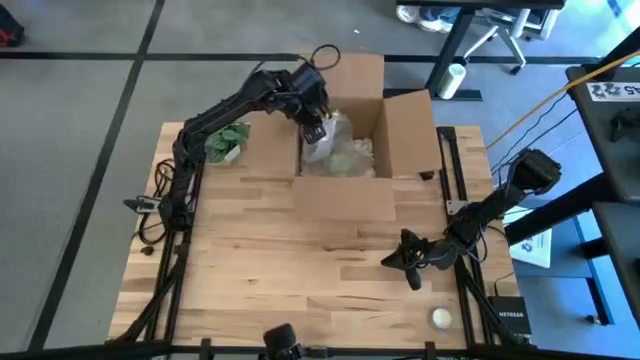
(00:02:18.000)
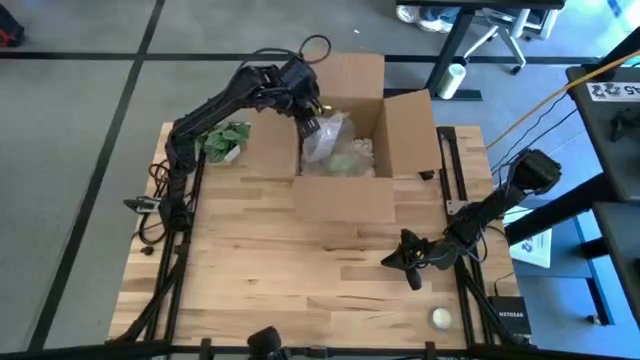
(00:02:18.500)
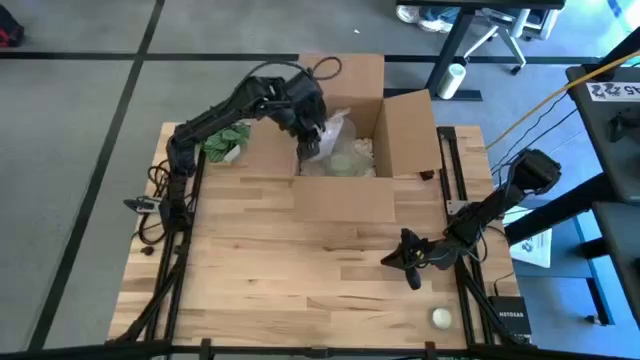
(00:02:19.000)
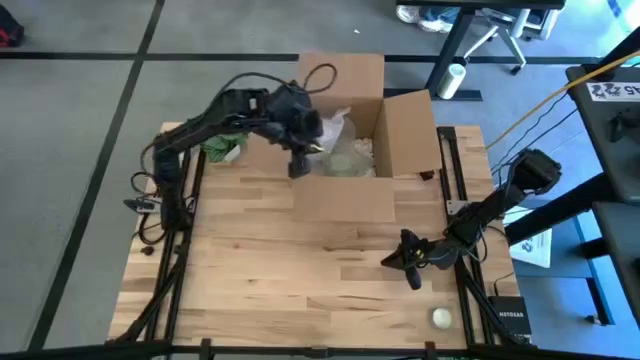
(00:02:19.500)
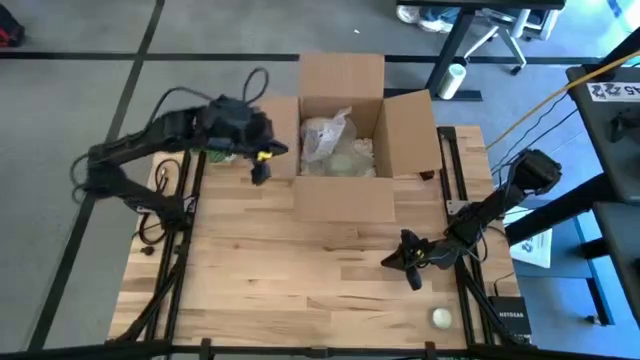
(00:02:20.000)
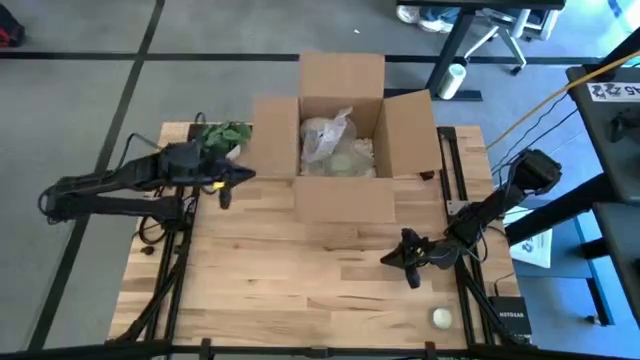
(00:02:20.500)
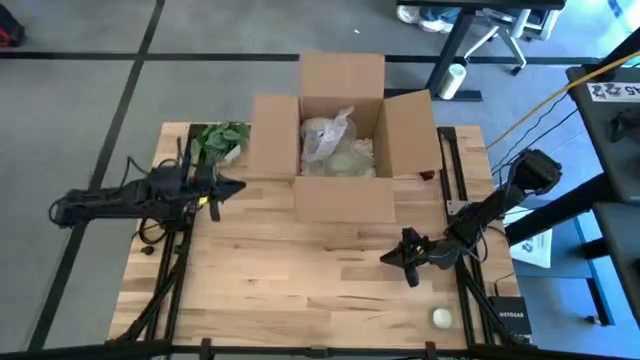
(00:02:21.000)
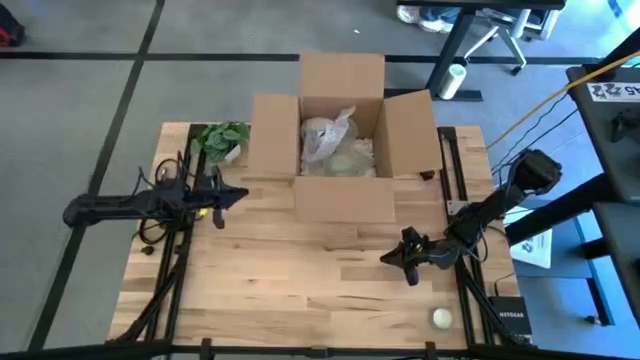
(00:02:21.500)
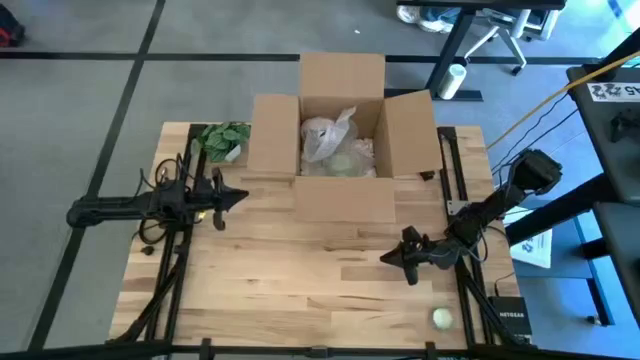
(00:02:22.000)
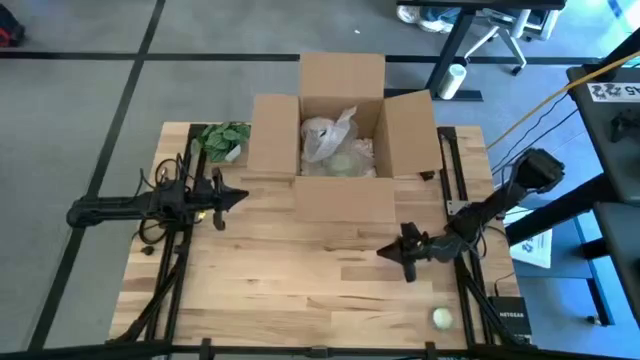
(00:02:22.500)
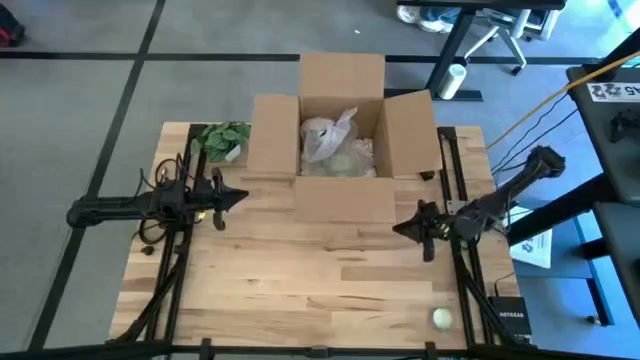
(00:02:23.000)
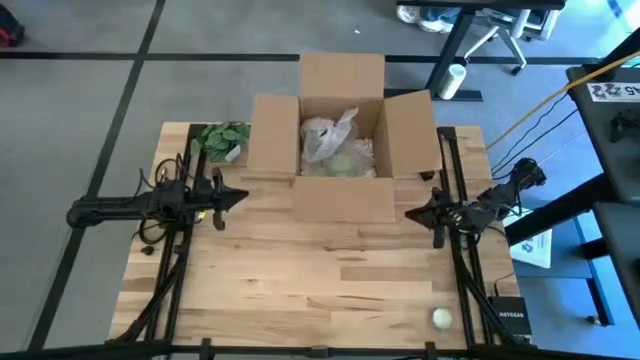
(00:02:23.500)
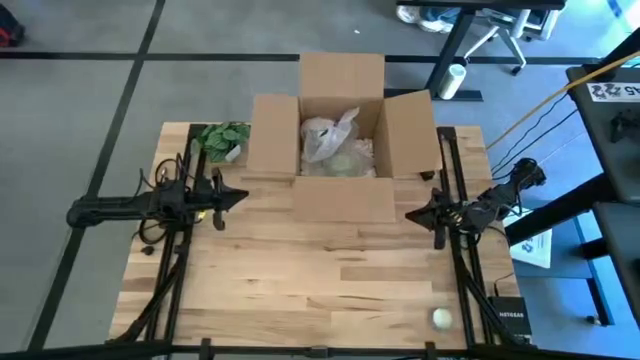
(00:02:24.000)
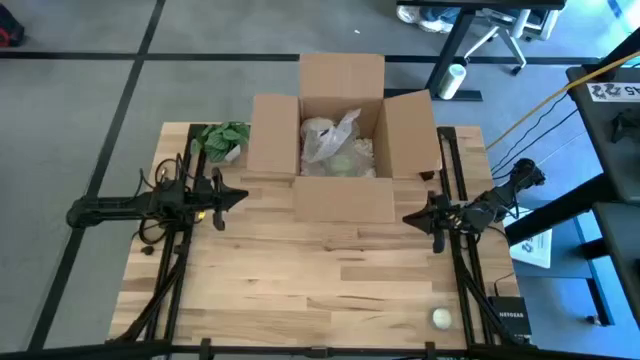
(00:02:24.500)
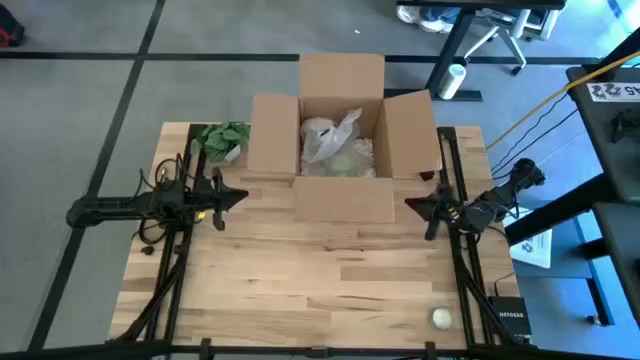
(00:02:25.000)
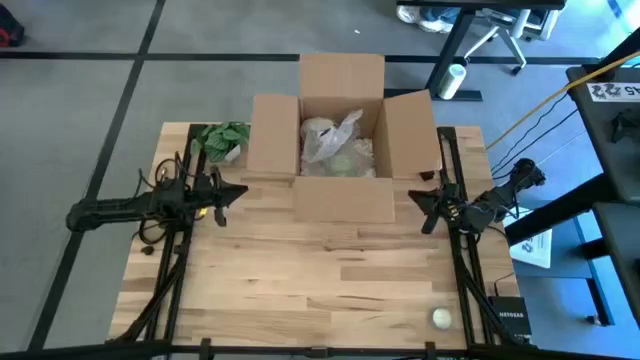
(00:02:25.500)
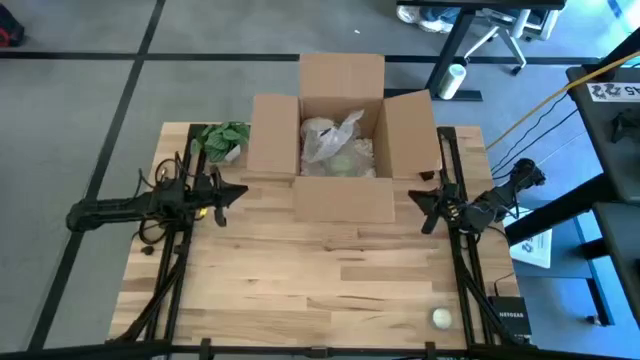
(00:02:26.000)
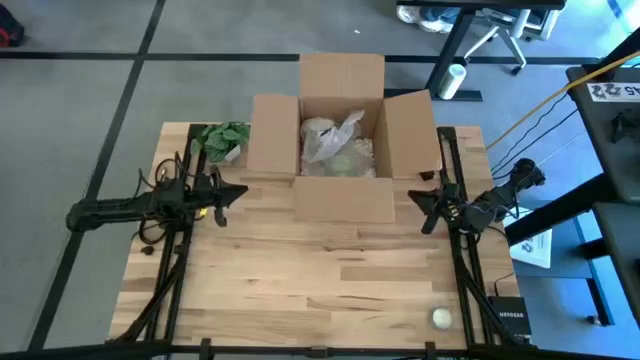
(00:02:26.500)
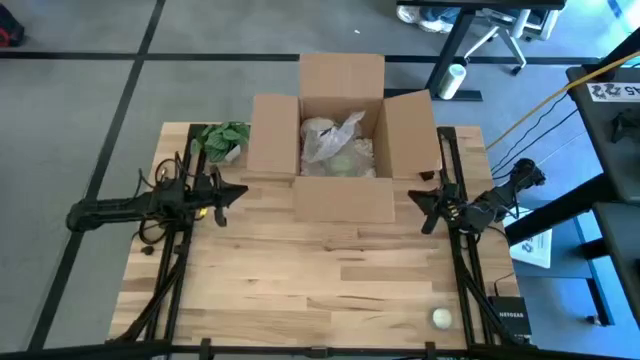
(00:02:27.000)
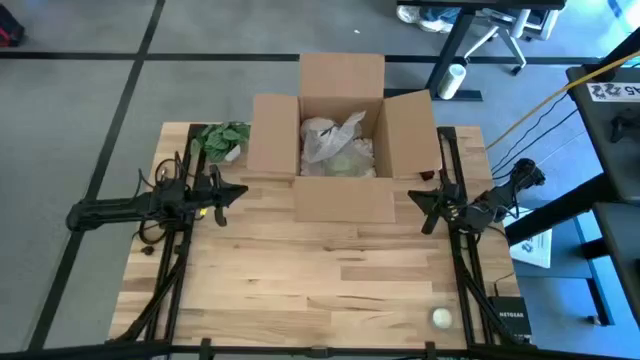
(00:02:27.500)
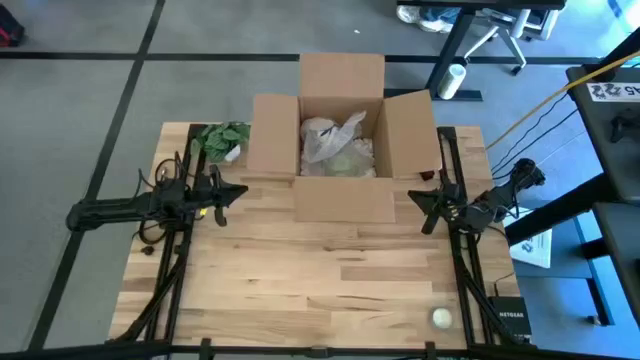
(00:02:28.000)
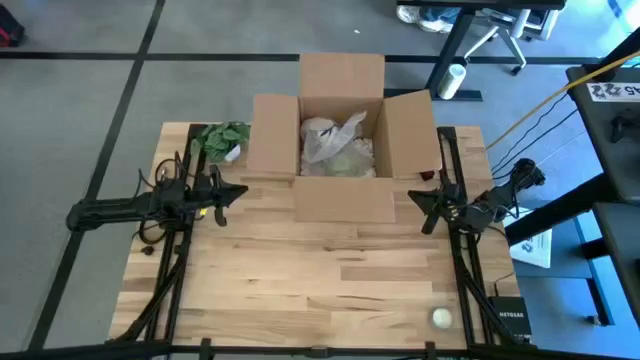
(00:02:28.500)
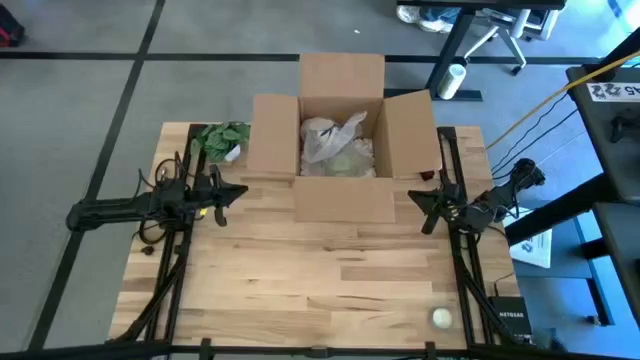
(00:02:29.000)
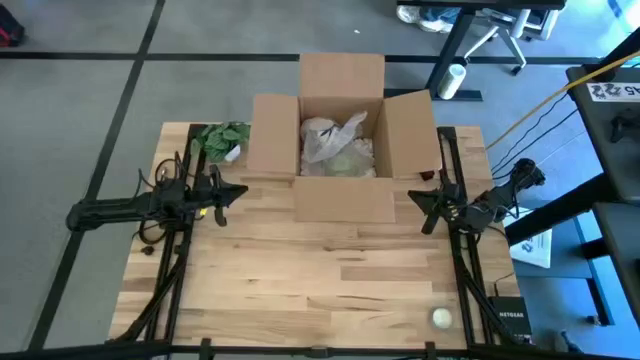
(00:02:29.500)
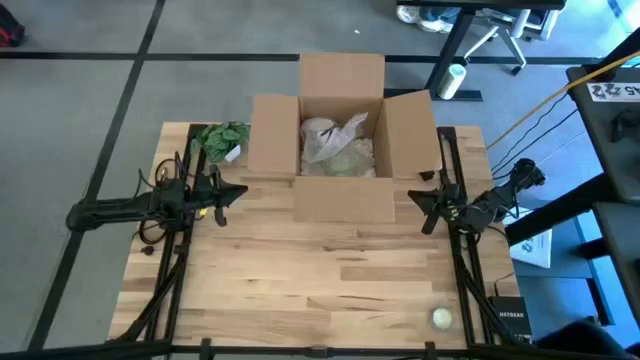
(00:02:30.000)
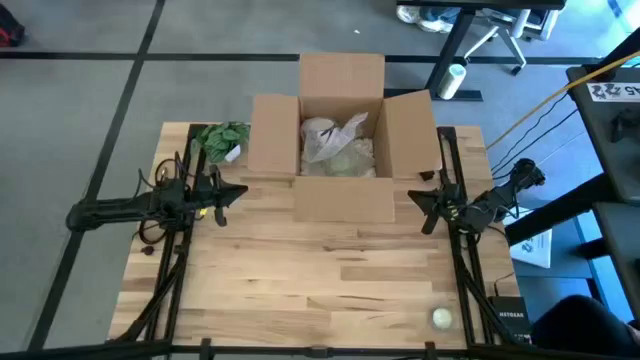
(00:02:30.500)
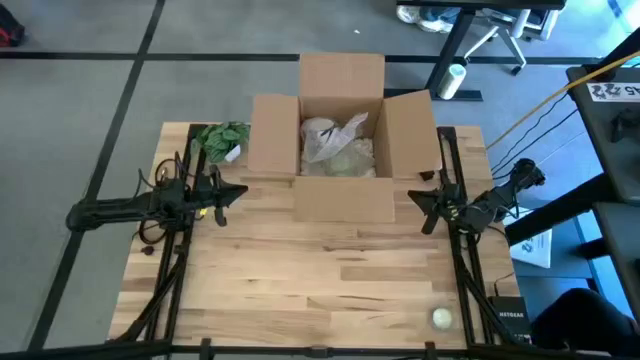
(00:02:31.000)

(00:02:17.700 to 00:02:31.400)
Task: wrap mug
Return to Home Position

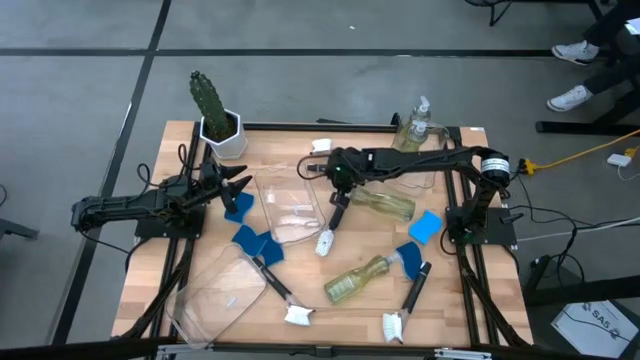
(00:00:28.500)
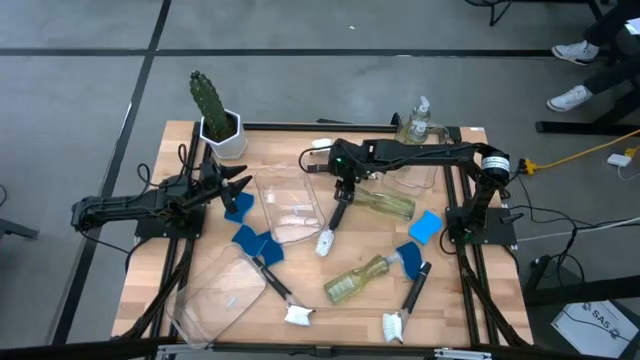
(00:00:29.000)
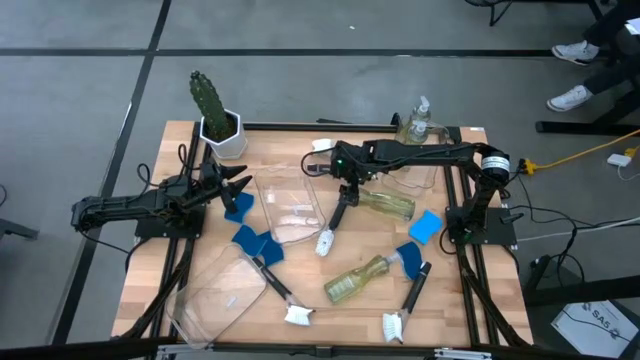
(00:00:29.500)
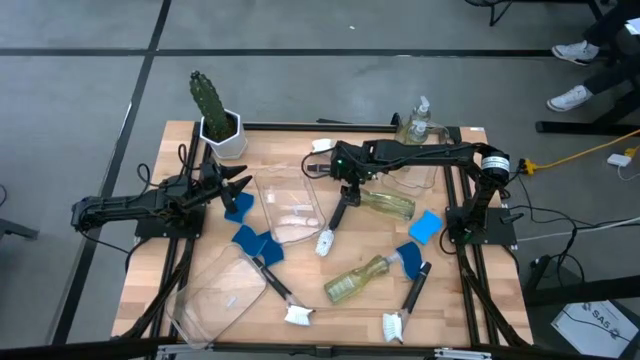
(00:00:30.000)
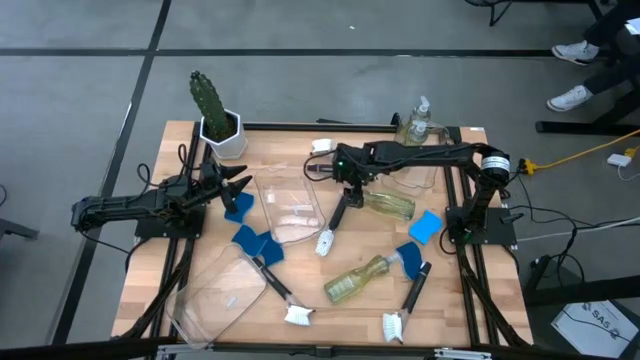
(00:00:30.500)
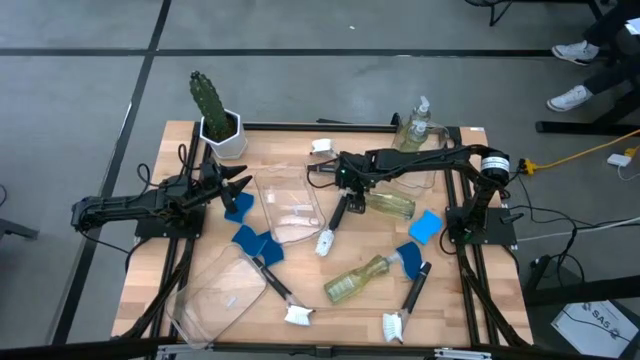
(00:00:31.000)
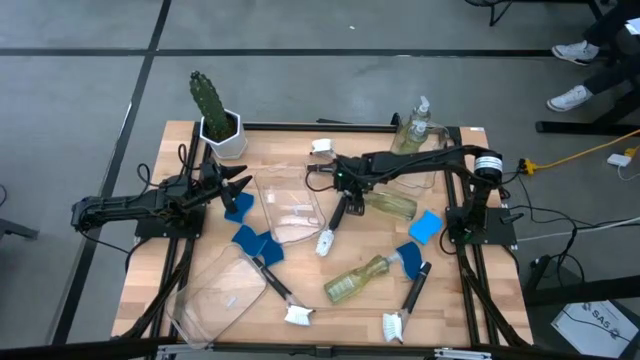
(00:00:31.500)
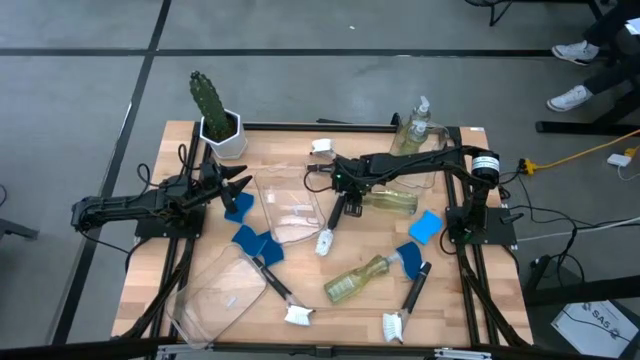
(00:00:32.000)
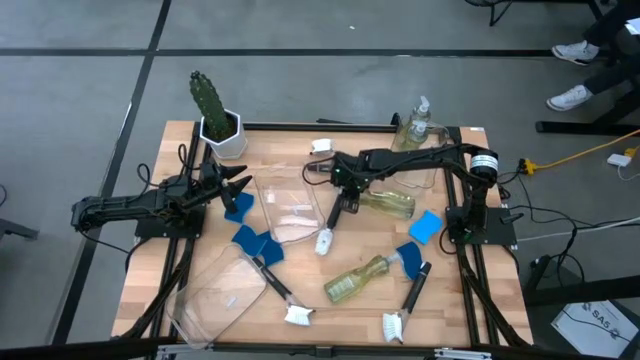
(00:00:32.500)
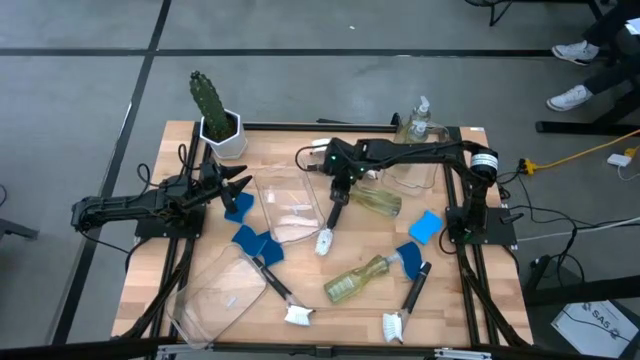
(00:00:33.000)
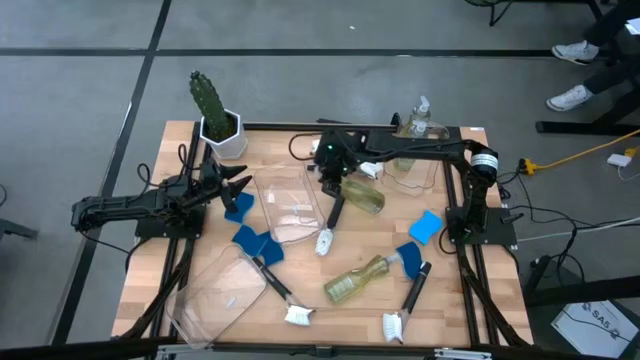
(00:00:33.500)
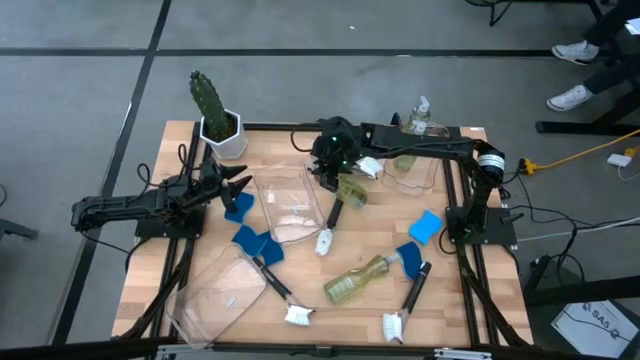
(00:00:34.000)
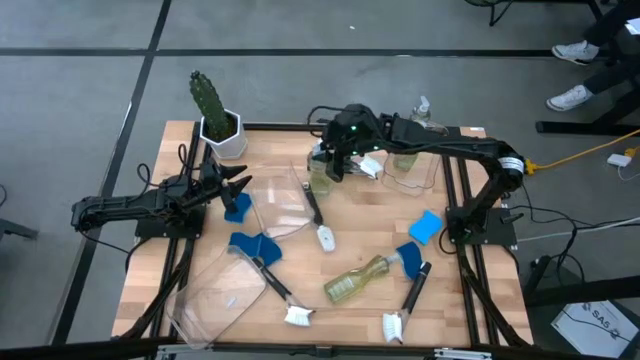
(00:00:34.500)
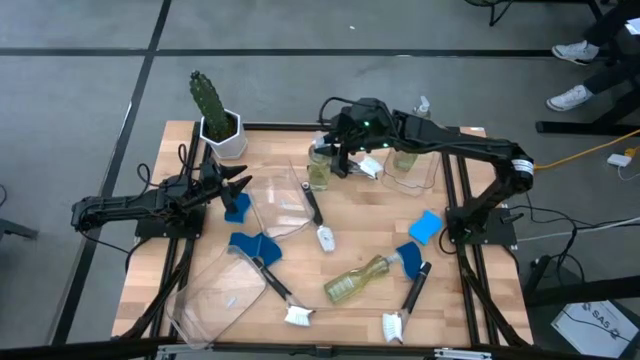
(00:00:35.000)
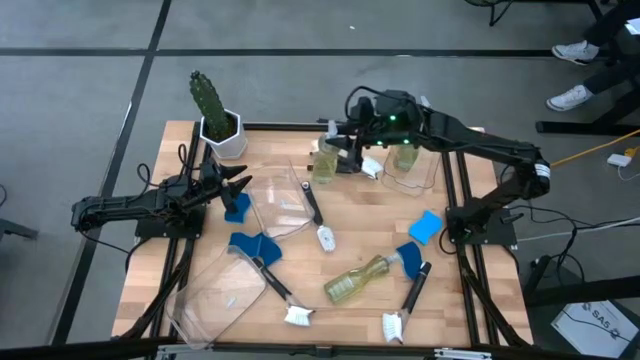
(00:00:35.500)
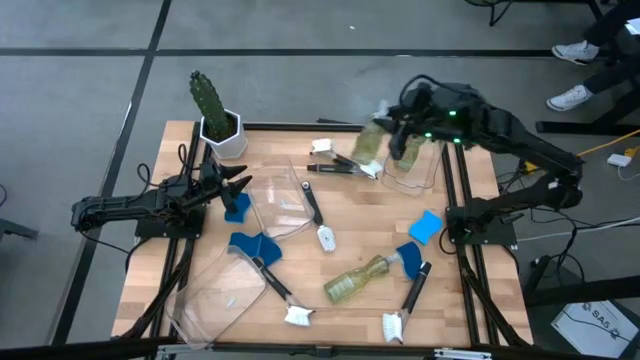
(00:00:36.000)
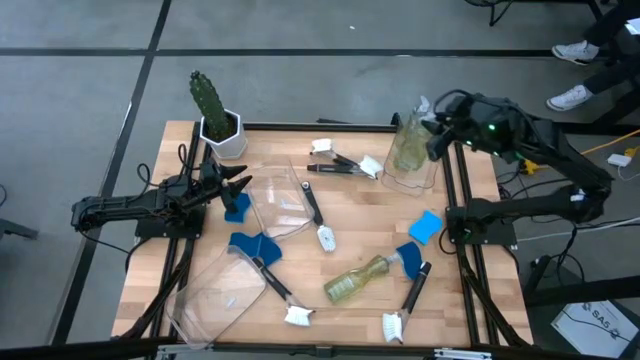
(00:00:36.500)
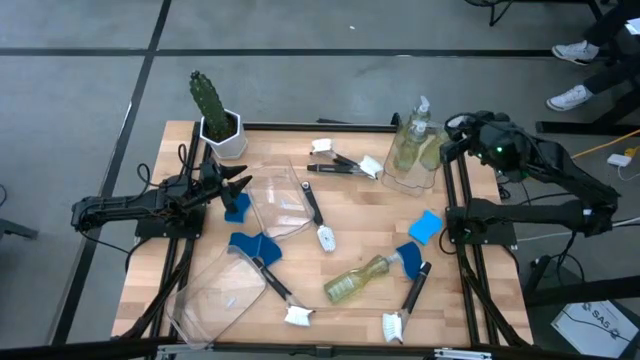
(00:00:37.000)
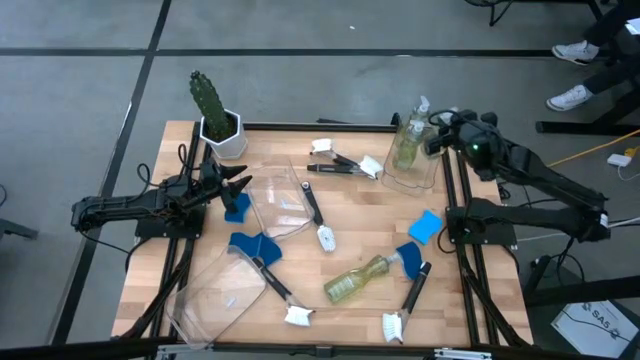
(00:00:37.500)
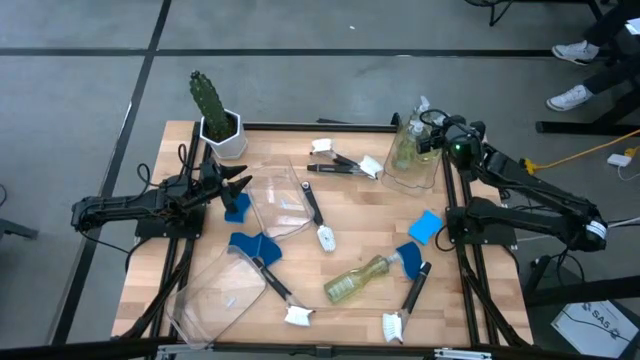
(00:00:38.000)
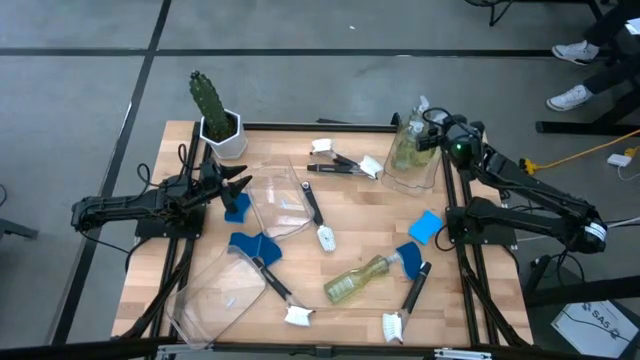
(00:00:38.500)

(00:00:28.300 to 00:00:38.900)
Task: Pick & Place Kitchen Sink Supplies
Put the green dish soap into the top right transparent bin
